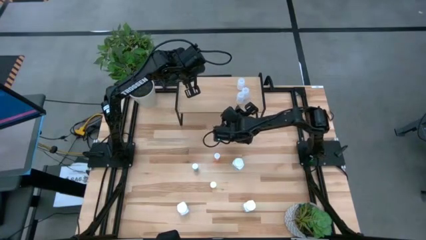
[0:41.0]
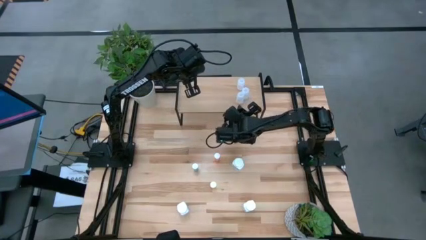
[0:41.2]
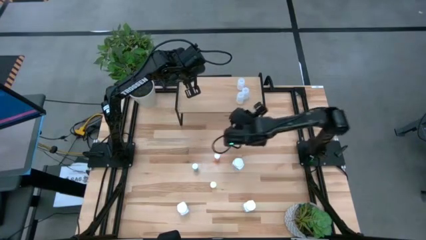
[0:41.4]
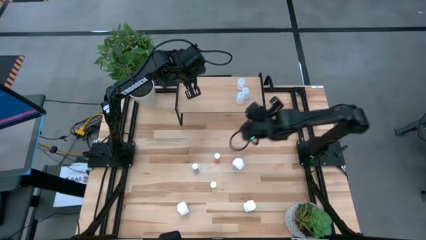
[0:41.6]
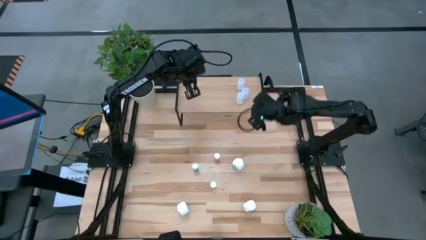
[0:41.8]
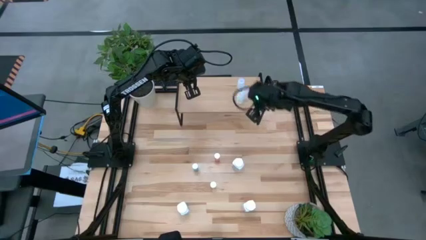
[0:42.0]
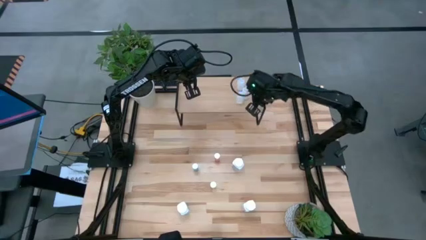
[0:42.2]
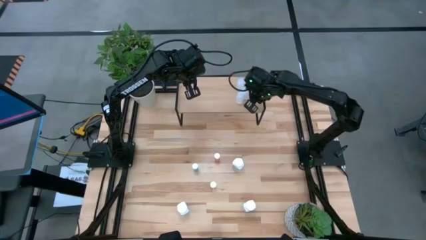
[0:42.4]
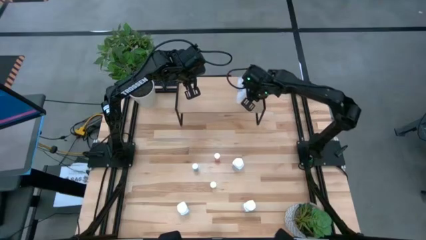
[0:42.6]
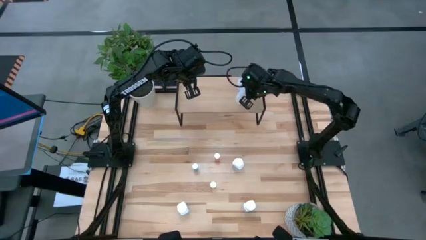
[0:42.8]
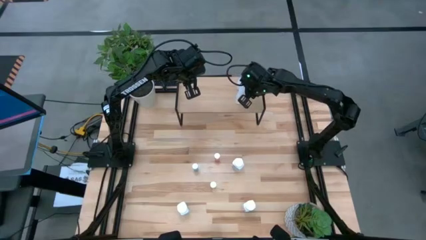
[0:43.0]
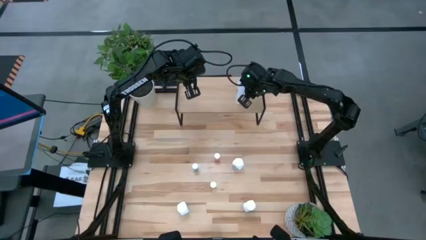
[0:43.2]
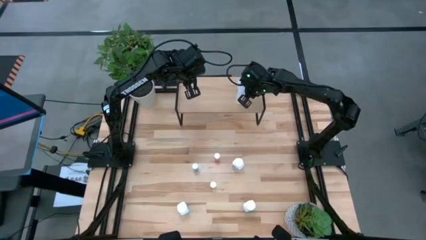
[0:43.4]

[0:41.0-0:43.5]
Task: Pick and place medicine bottles onto shelf by color
Adjust the white pill bottle on the shelf

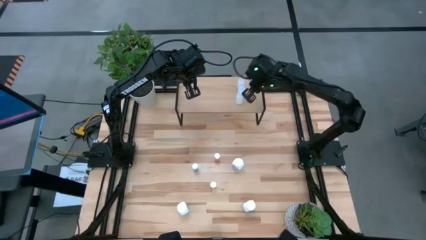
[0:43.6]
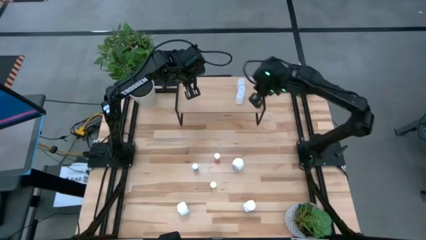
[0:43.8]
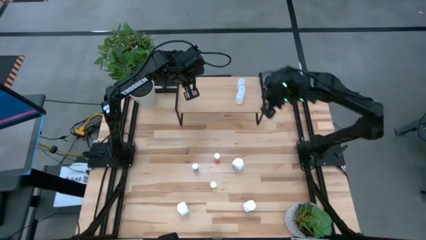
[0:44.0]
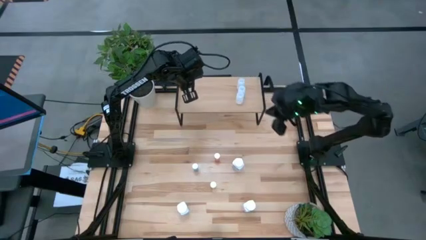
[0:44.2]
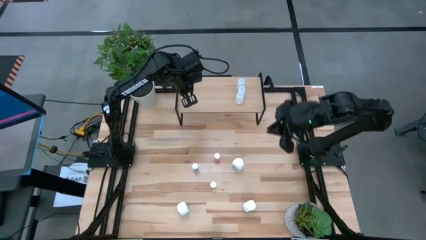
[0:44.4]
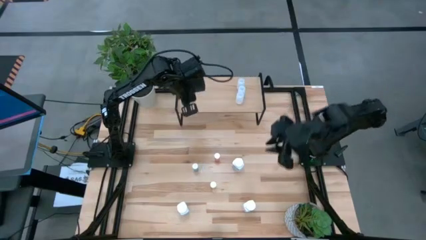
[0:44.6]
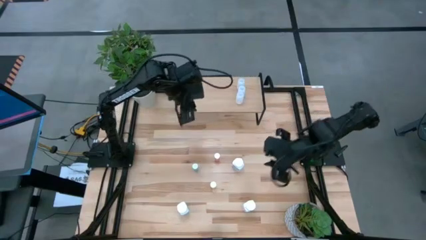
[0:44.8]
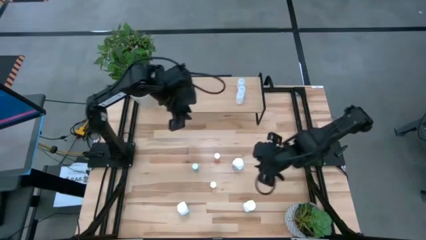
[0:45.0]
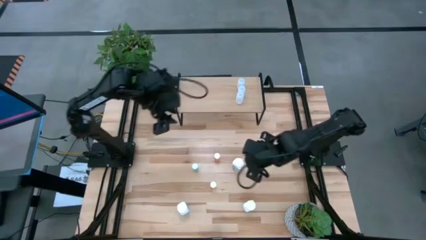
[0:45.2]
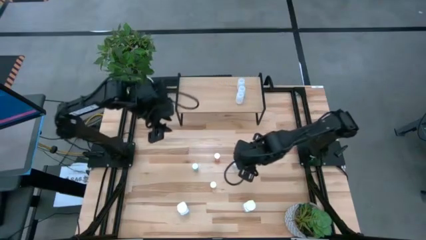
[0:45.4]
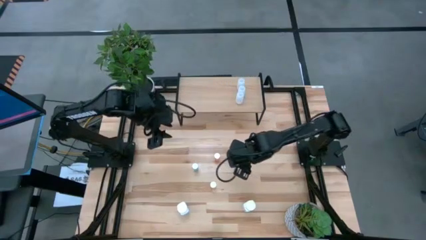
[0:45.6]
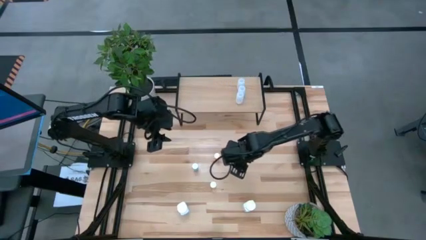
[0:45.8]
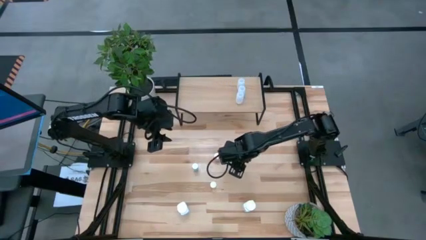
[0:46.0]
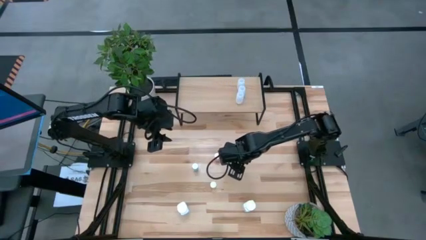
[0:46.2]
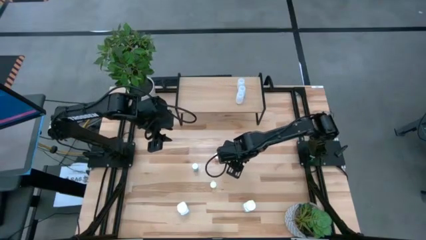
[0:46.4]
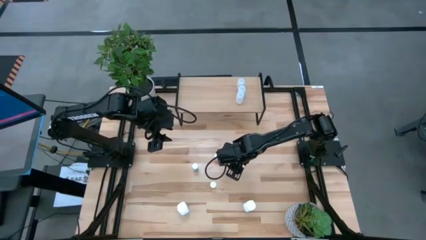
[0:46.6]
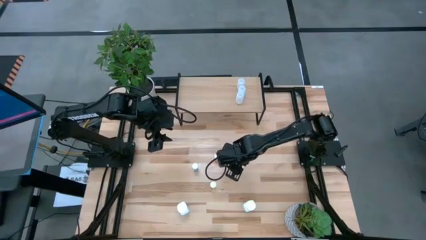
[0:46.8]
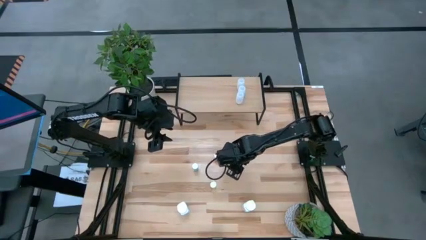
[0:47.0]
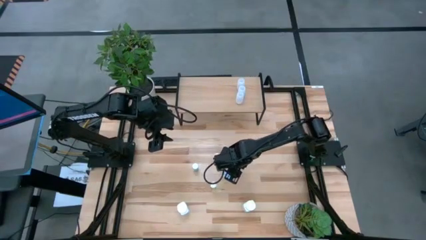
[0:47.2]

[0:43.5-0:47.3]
Put the top white and blue pill bottle on the shelf

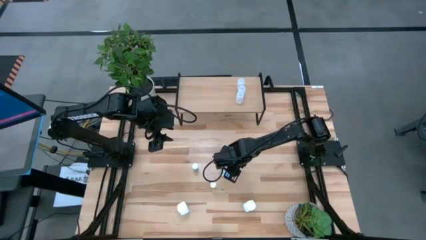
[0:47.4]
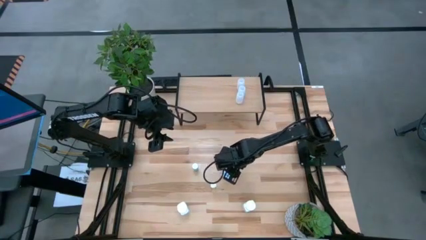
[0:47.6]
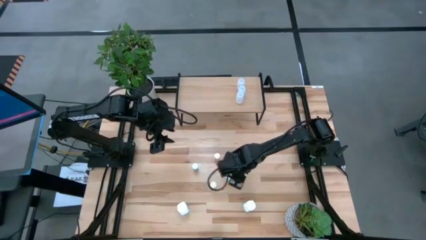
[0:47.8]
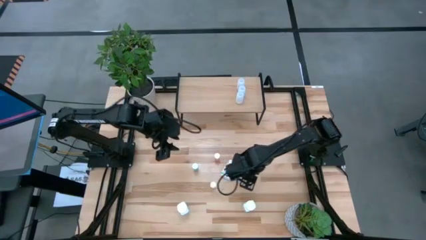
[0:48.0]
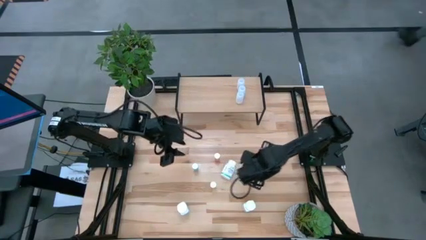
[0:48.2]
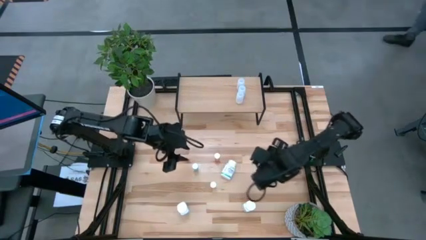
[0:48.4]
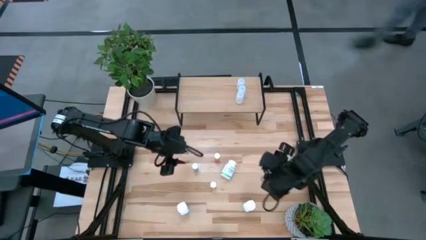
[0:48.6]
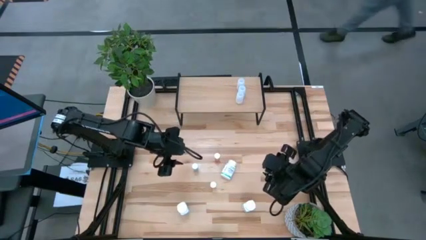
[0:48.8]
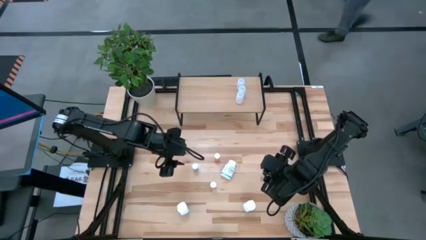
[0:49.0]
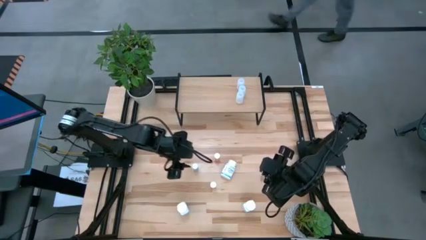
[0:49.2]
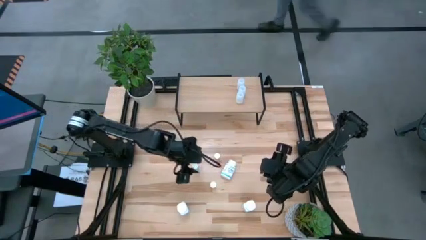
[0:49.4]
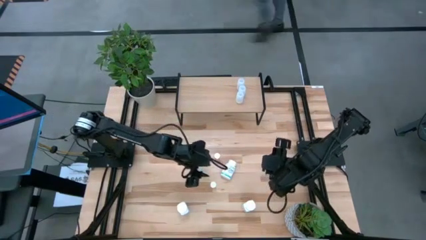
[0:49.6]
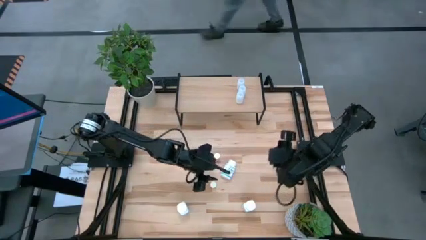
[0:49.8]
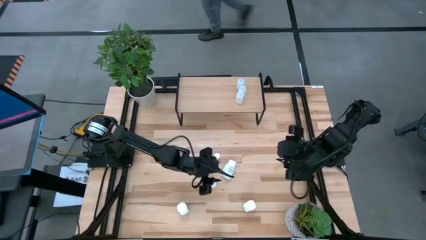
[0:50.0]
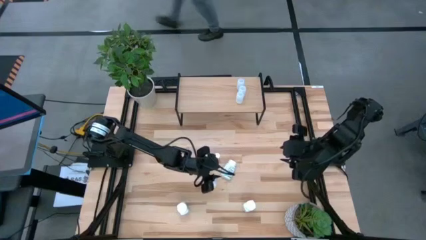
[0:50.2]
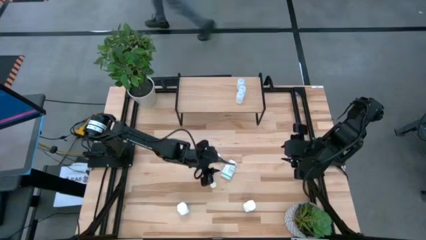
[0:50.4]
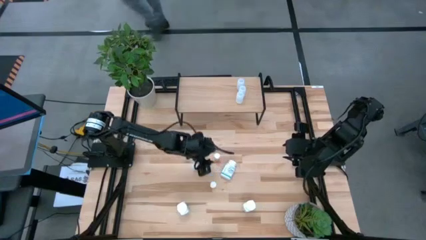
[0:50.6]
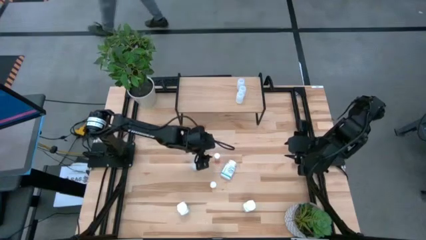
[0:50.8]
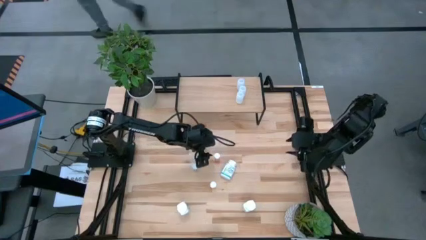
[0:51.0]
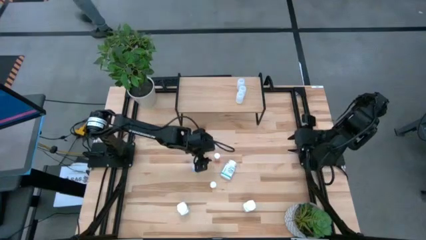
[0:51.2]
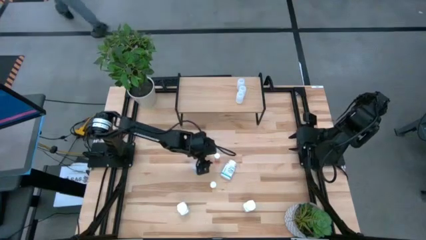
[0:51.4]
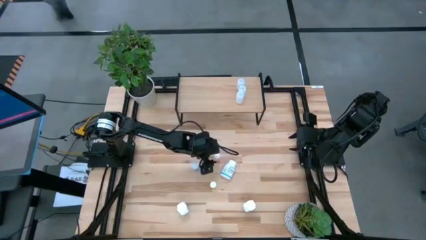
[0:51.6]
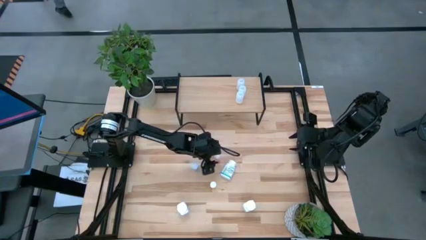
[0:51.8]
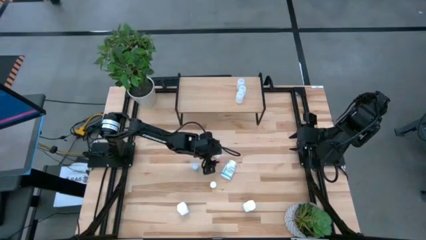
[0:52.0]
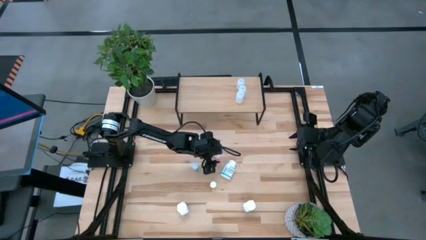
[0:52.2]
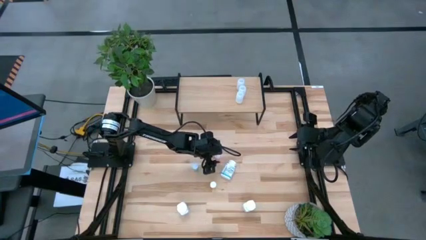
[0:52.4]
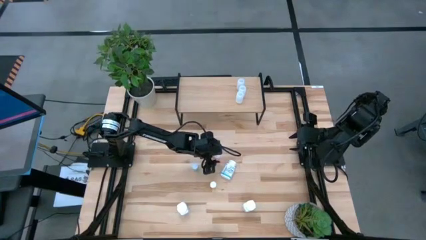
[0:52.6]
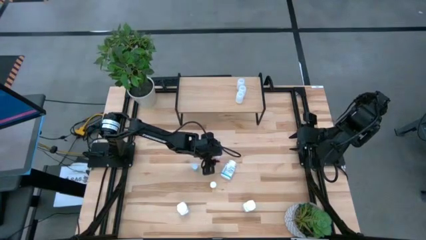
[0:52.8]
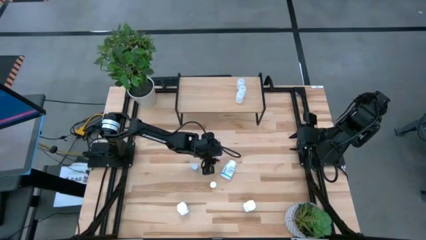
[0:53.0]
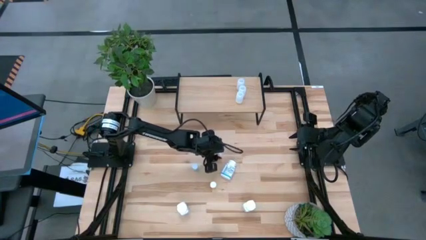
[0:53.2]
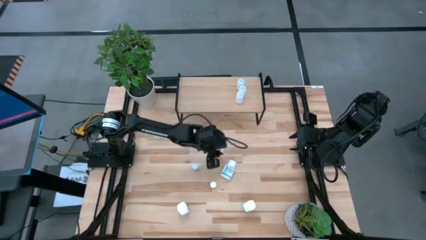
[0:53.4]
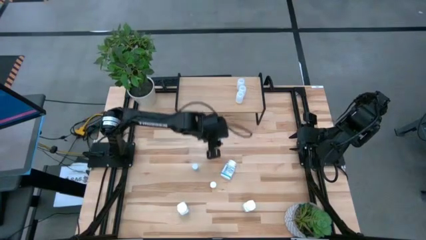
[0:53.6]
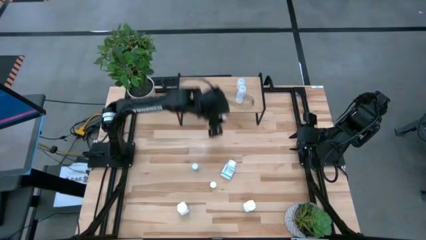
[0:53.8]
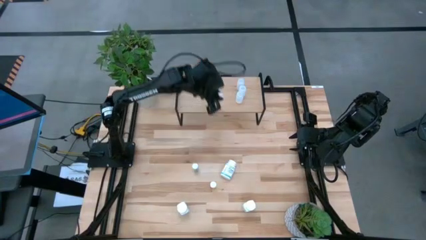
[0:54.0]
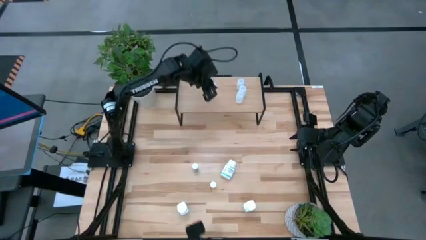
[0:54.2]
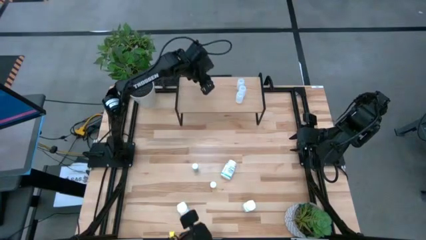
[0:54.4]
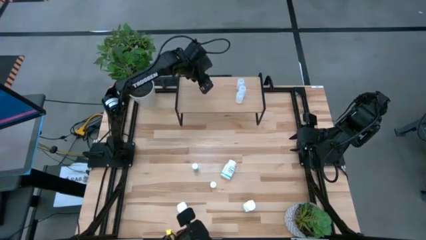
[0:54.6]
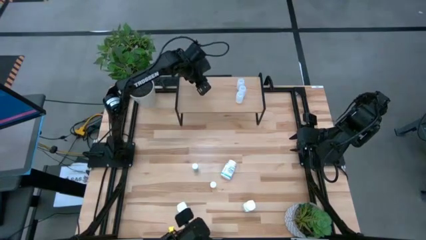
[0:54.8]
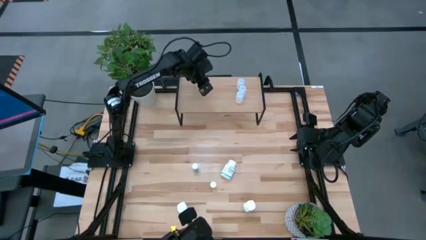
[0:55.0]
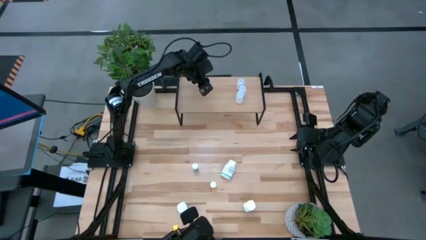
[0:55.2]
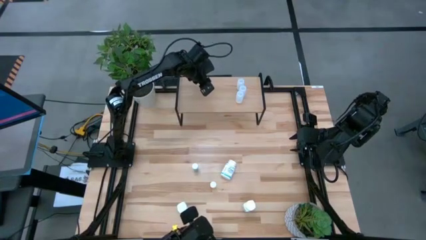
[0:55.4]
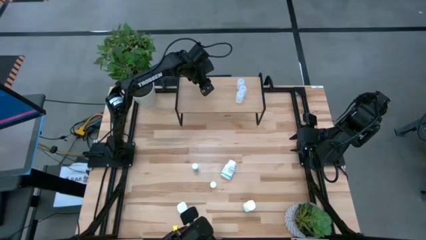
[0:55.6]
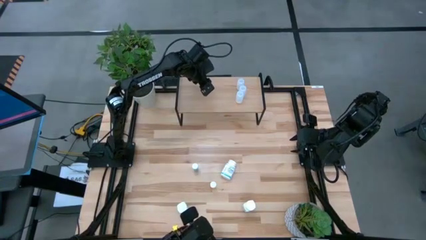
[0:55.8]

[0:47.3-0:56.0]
Put the red pill bottle on the shelf

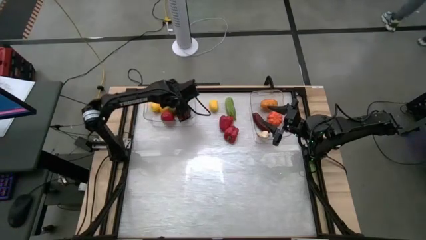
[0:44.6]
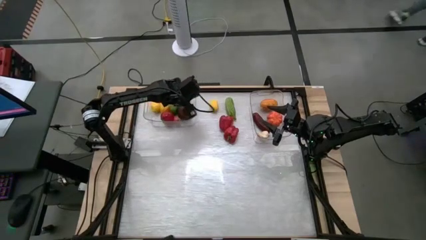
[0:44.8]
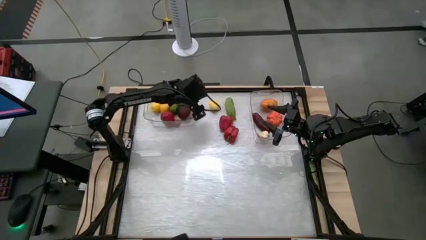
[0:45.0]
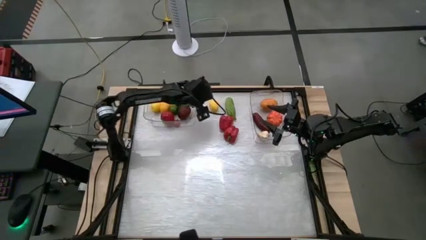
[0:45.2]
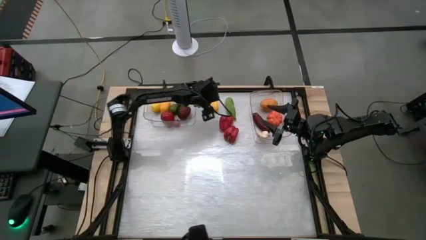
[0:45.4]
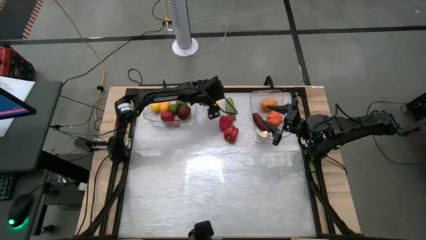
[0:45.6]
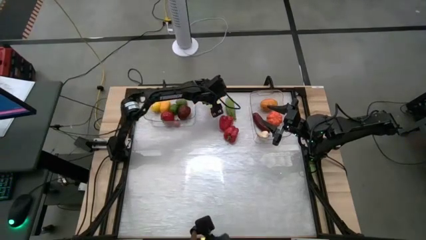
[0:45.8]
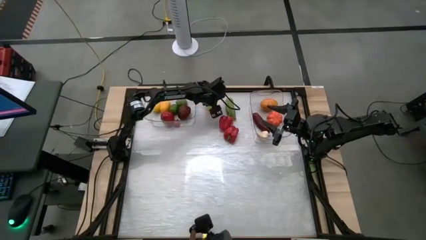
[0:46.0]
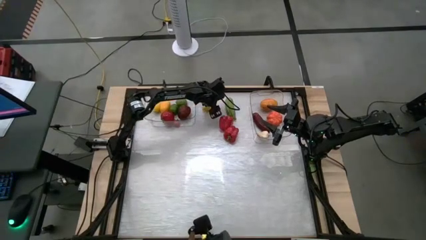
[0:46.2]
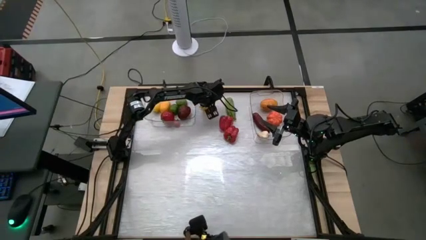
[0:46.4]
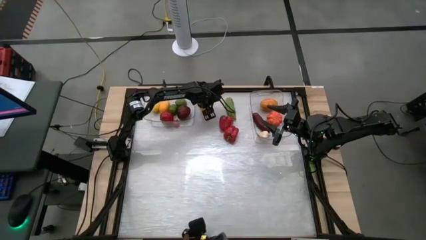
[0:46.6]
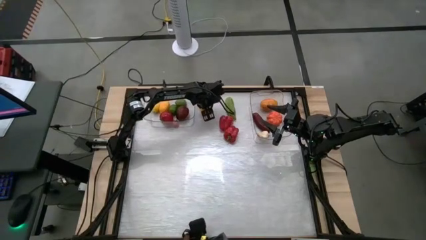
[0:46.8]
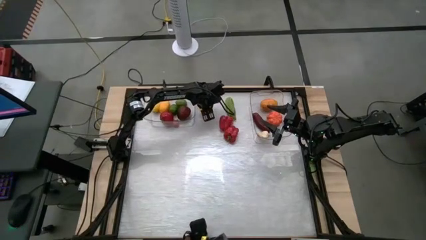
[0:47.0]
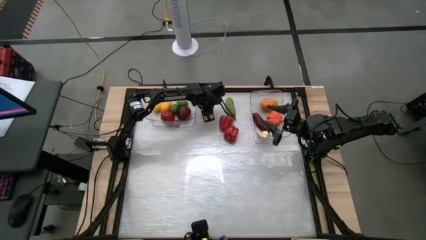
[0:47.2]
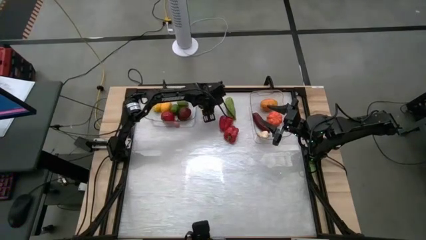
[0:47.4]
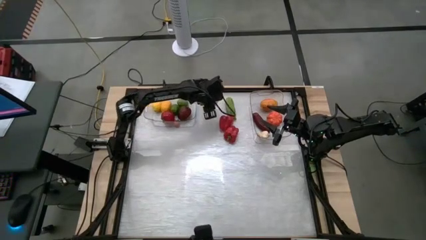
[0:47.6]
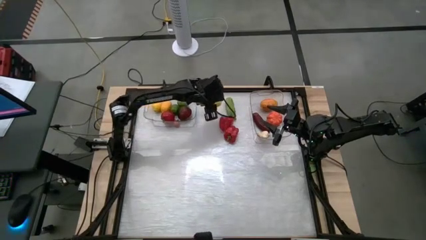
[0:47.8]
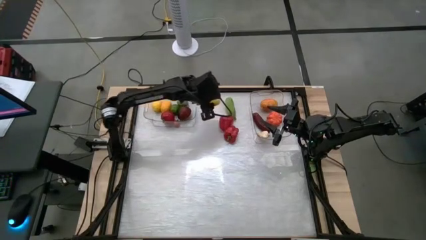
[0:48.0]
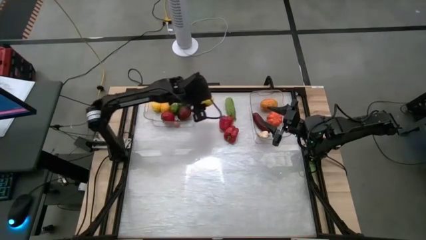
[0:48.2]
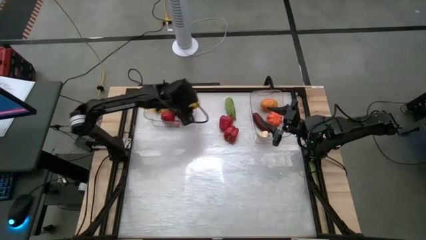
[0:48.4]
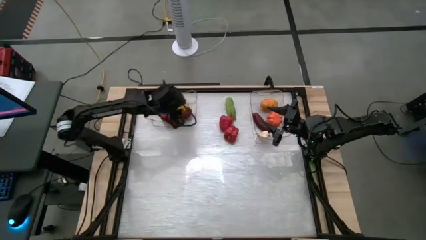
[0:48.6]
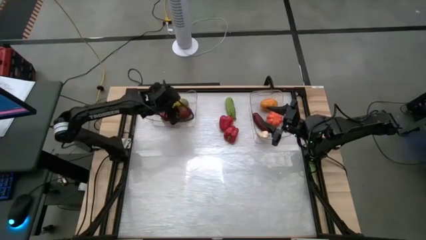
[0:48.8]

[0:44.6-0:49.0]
Task: Sort produce into baskets
Put the yellow lemon into the left transparent bin
